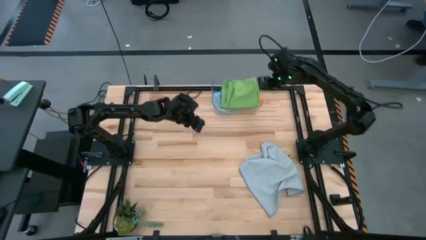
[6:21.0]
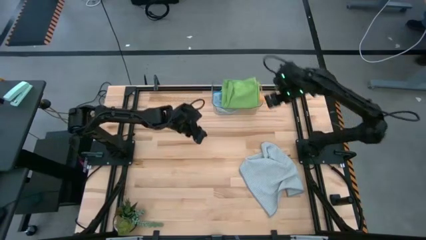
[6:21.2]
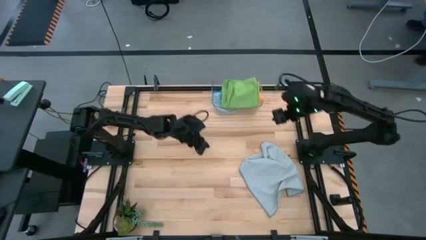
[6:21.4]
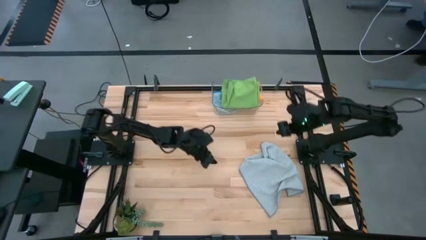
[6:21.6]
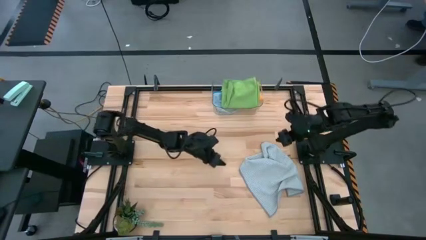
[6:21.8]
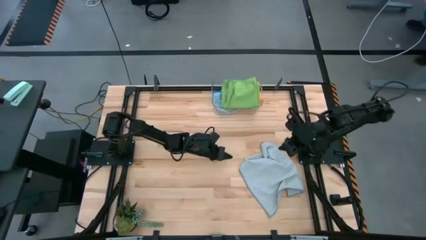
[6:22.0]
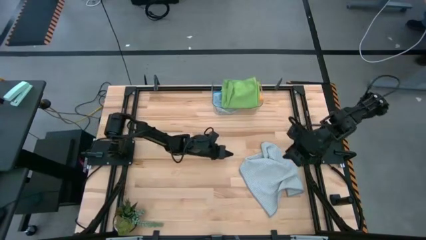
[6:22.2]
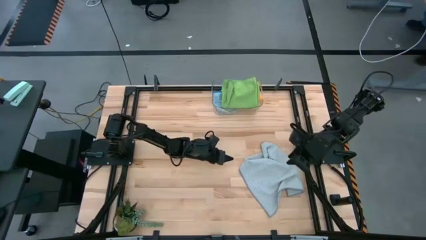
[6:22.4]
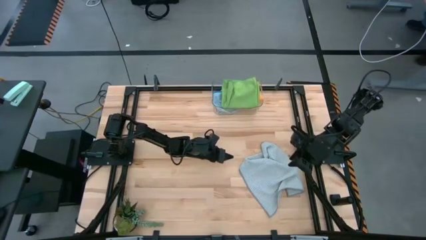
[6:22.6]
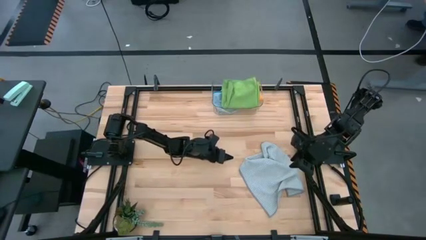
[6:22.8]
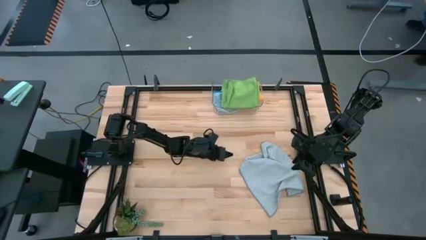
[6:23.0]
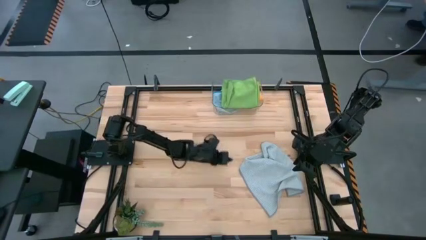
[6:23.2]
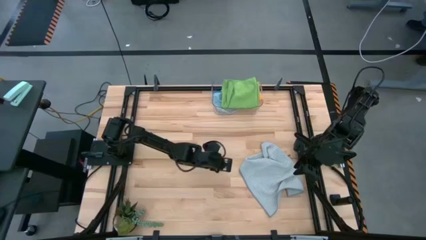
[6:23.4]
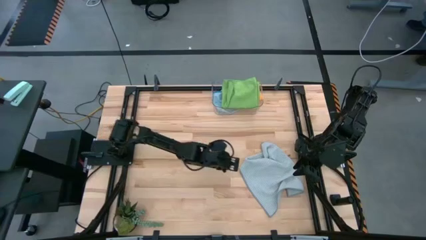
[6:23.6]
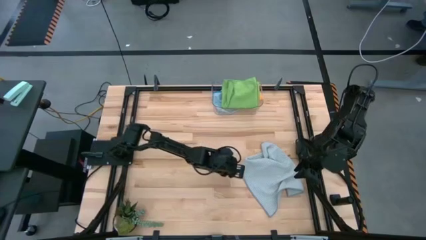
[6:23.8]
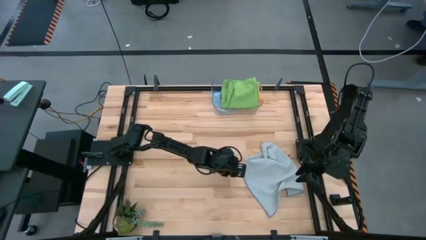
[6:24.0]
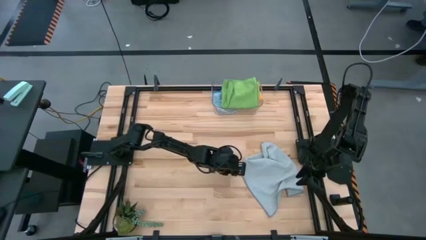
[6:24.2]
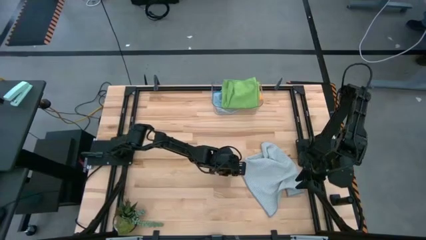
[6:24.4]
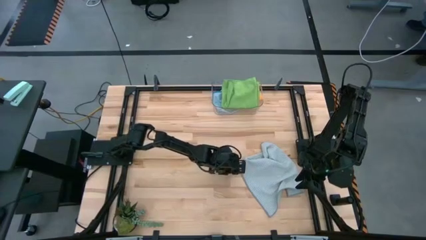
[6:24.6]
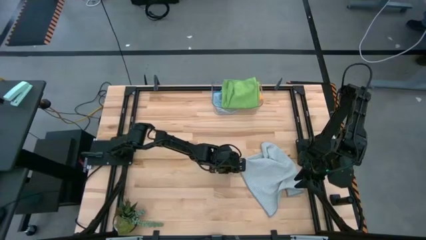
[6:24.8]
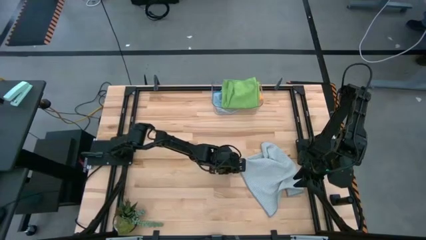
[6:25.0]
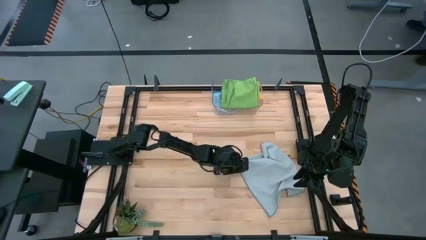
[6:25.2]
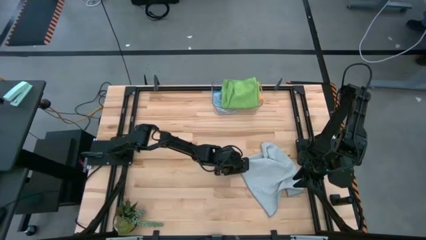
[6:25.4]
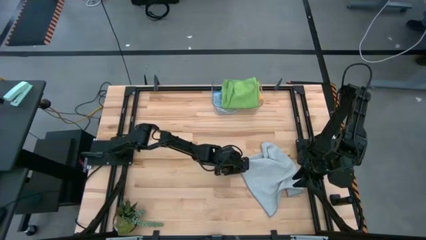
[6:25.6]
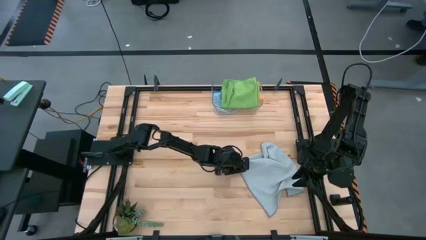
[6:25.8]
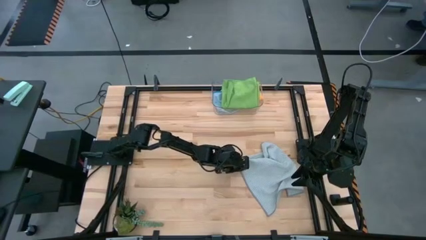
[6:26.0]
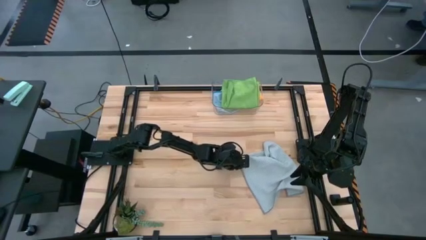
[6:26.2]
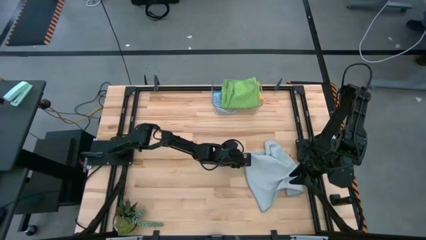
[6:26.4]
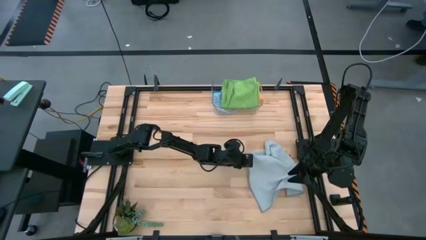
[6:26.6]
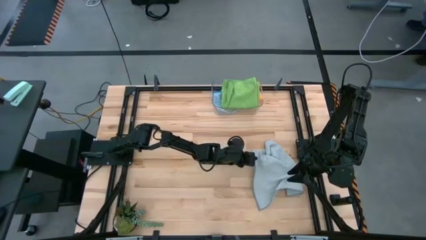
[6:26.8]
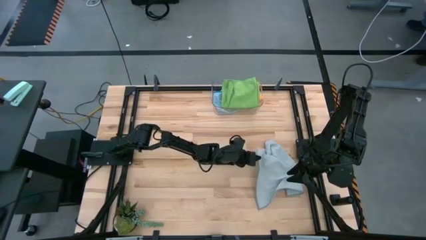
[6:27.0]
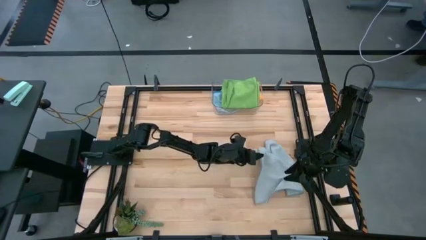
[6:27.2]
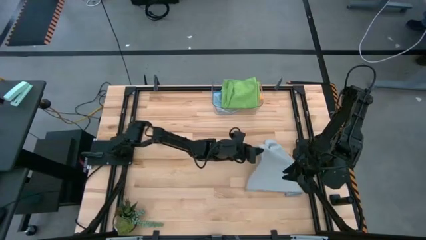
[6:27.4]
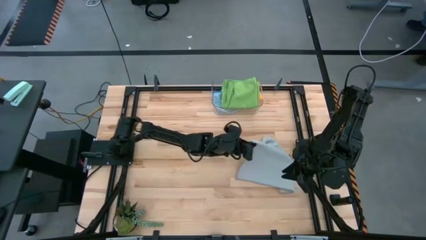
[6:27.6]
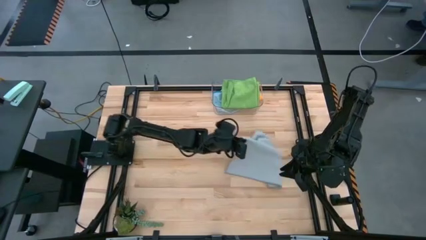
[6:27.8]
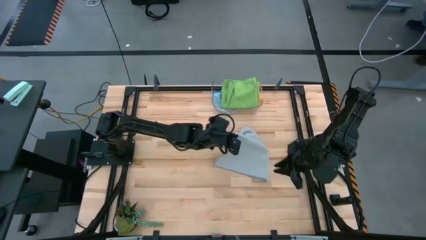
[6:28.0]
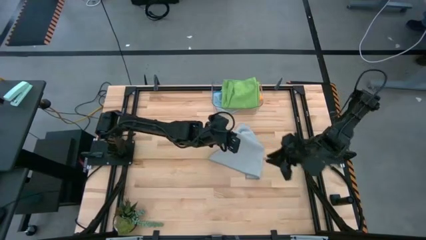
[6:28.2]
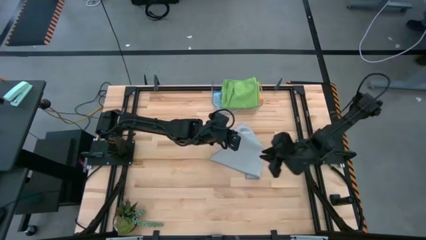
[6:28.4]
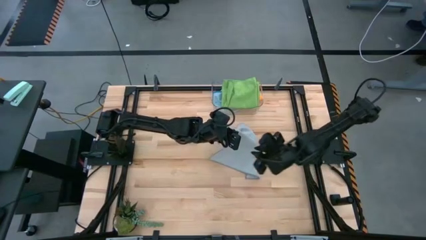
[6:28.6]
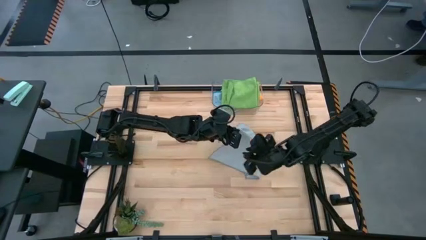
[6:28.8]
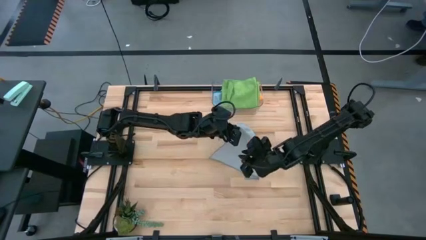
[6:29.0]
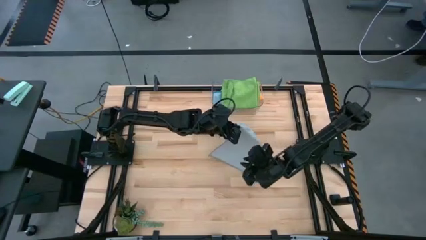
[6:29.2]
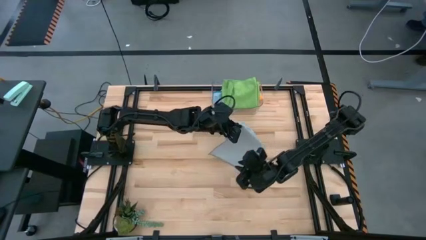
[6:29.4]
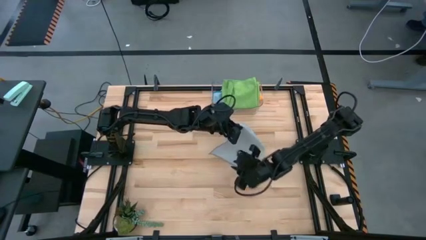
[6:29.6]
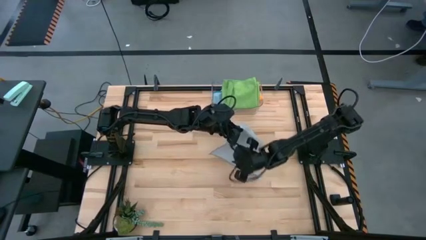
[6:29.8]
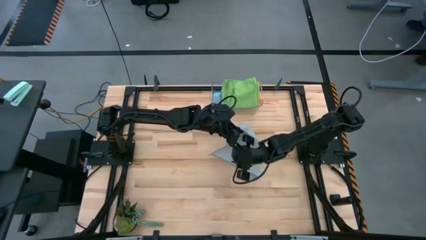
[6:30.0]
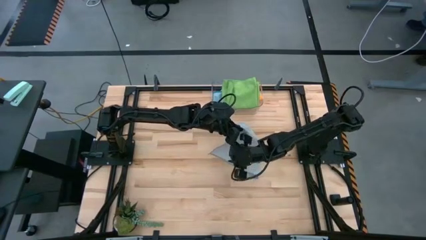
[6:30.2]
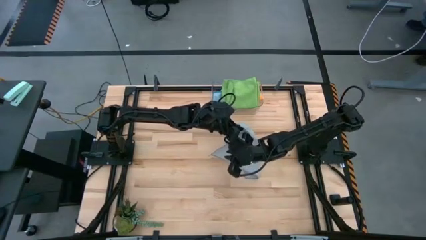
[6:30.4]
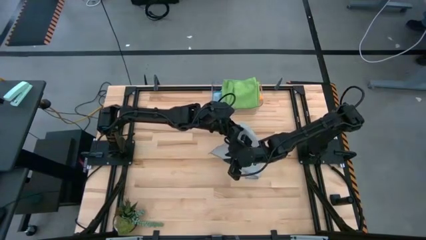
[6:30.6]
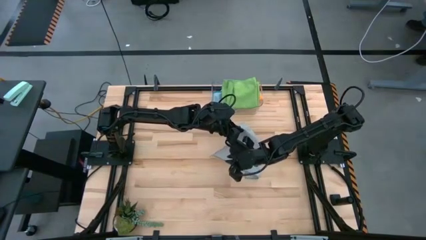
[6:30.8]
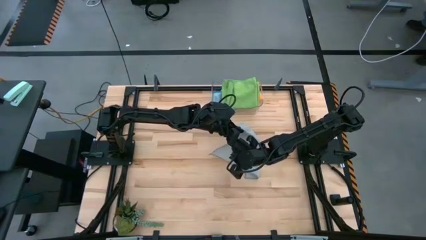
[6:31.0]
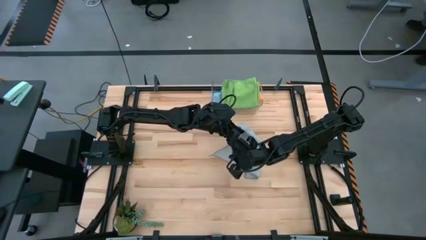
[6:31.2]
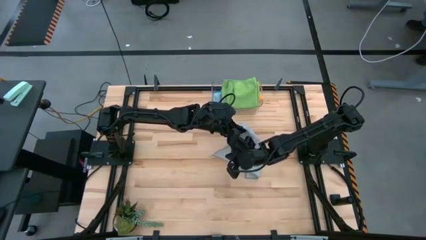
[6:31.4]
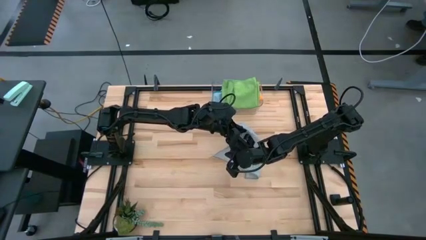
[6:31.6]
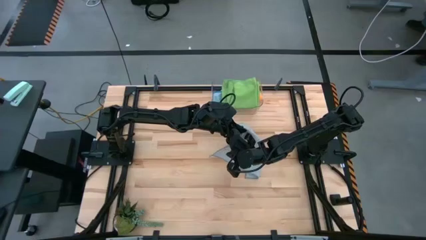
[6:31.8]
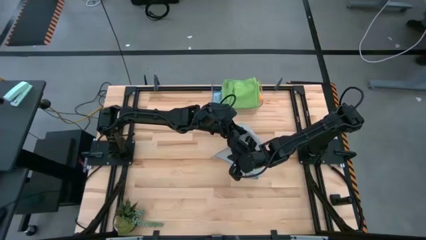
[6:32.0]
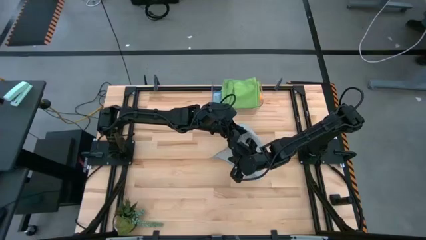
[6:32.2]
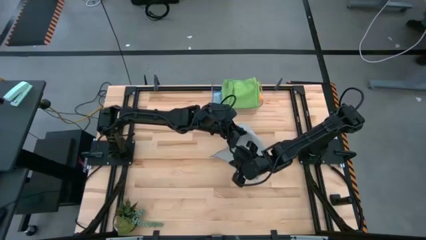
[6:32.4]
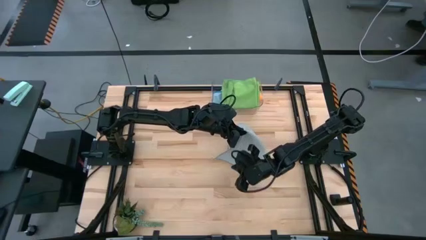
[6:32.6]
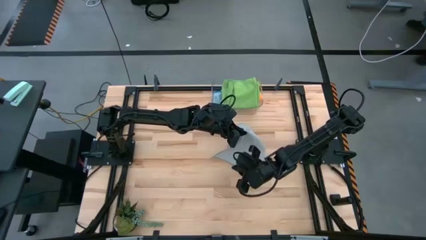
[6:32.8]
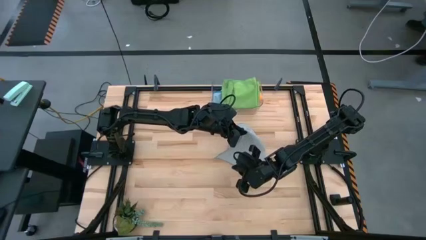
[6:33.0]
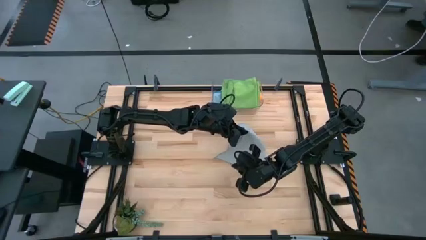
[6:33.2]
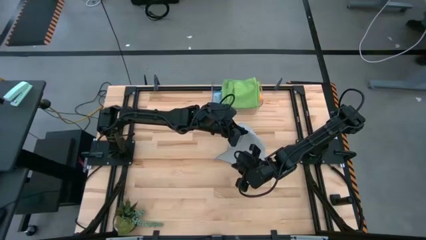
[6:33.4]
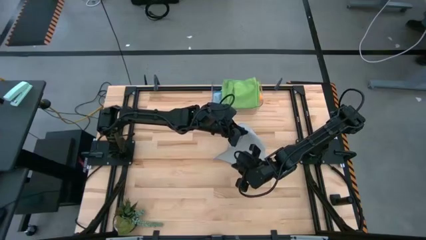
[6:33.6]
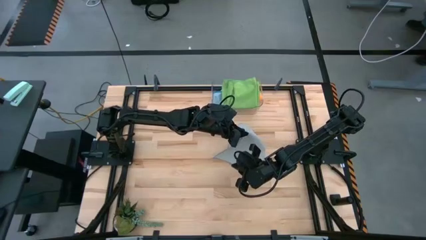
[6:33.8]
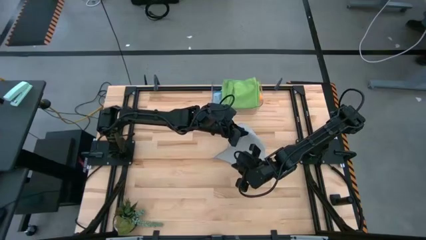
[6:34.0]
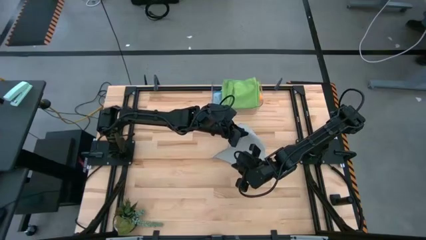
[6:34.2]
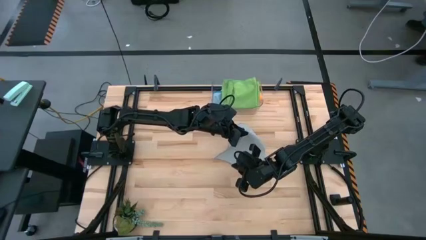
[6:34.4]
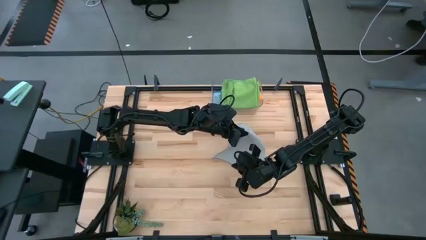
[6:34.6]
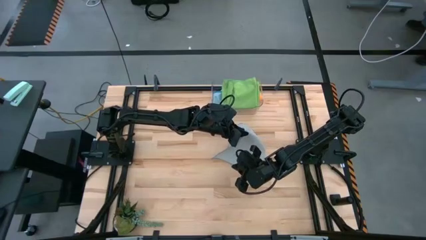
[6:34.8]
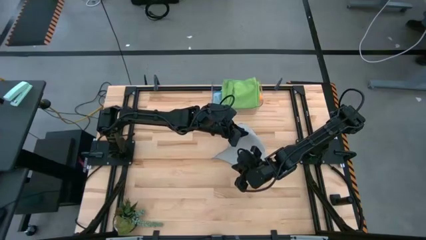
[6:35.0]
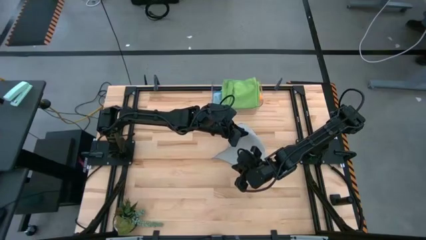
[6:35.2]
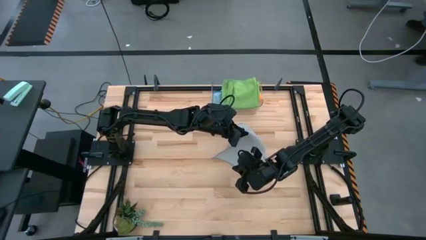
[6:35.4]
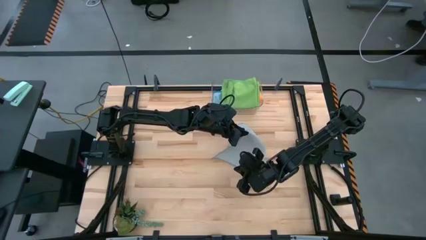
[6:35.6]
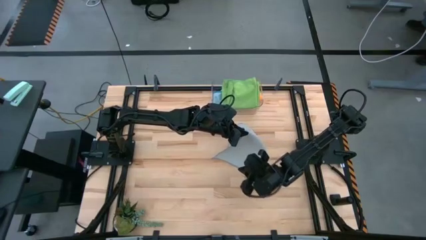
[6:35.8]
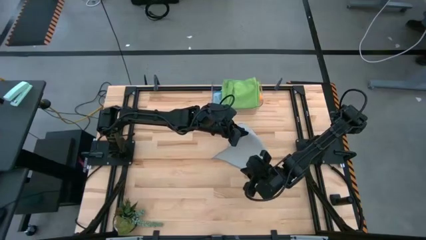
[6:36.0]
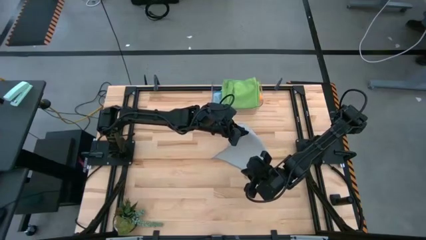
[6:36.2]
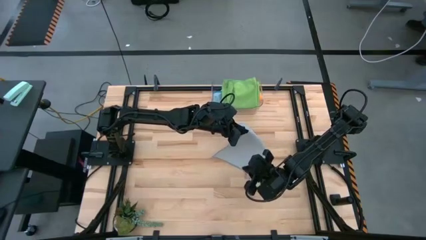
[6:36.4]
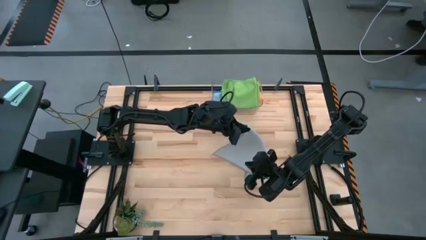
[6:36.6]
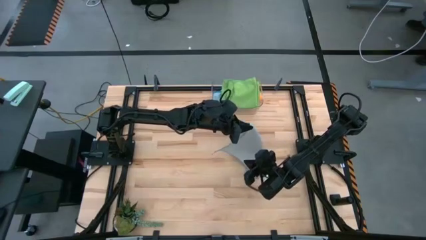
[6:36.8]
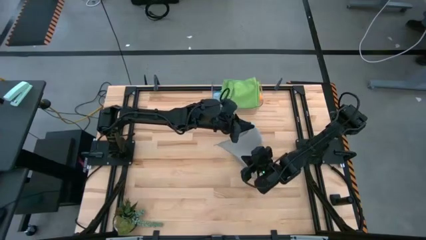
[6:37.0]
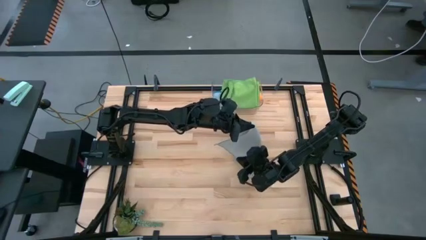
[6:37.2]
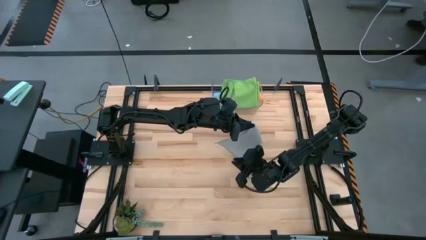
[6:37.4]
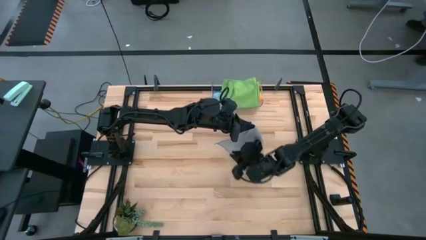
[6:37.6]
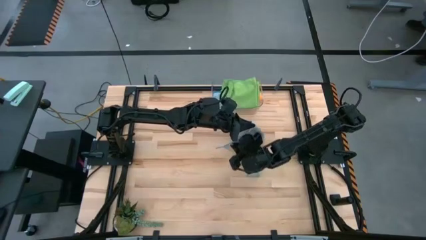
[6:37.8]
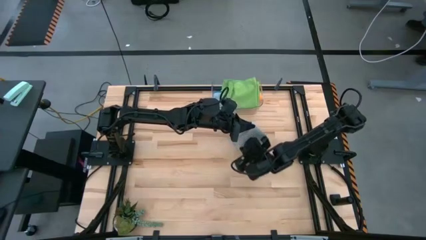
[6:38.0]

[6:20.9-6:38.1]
Task: Fold microfiber towels
Fold the gray microfiber cloth
